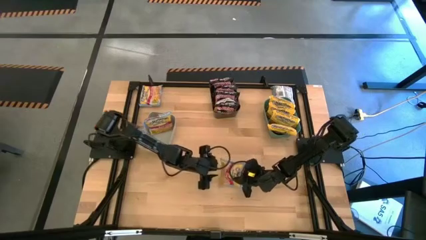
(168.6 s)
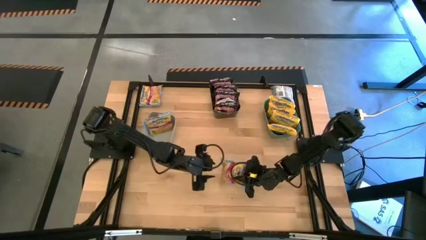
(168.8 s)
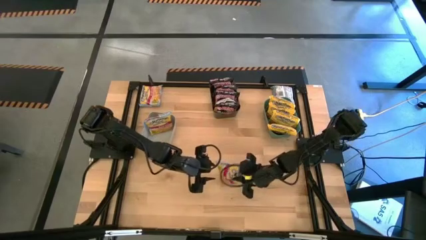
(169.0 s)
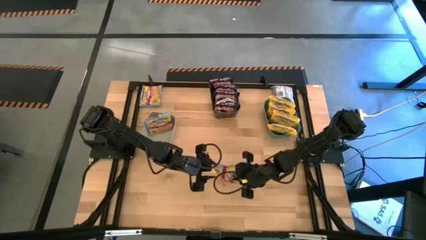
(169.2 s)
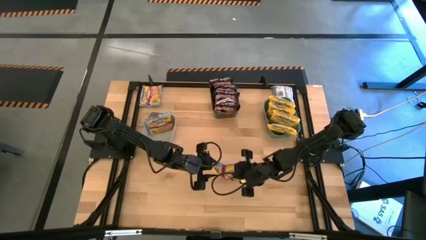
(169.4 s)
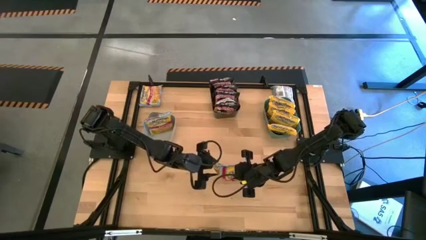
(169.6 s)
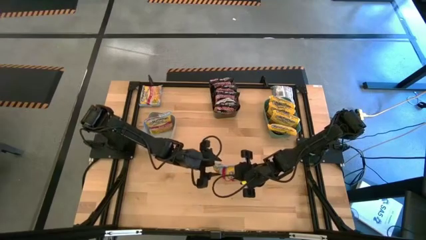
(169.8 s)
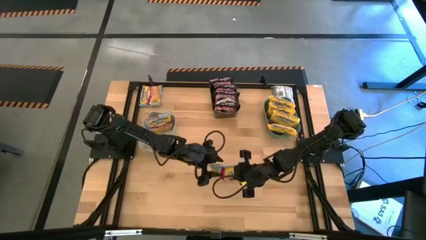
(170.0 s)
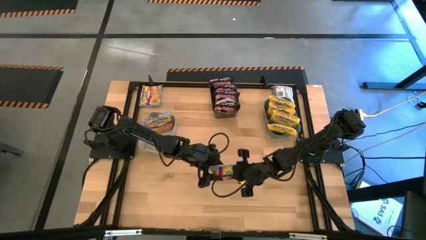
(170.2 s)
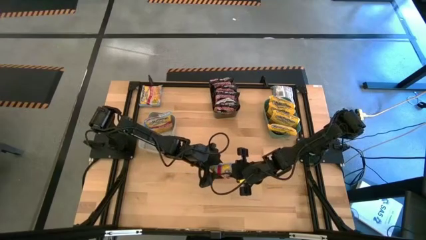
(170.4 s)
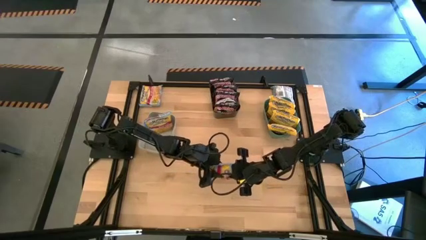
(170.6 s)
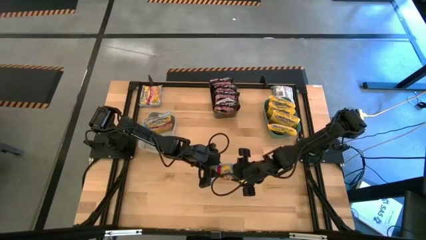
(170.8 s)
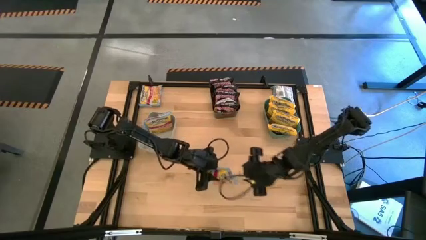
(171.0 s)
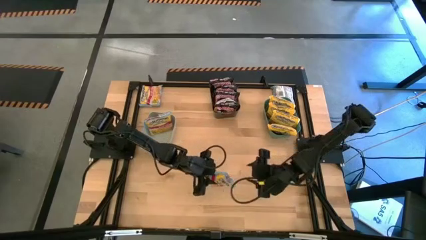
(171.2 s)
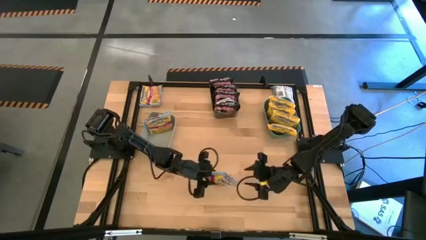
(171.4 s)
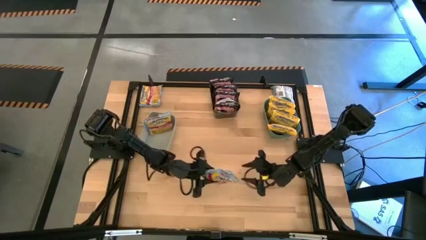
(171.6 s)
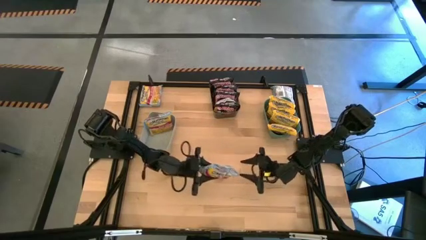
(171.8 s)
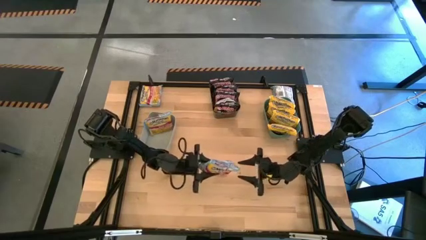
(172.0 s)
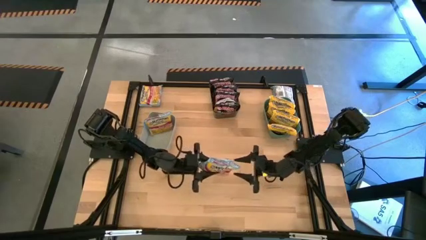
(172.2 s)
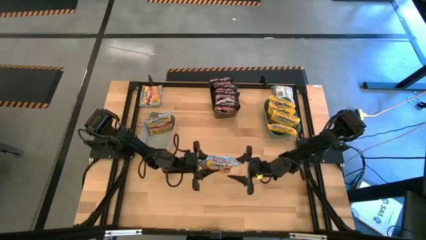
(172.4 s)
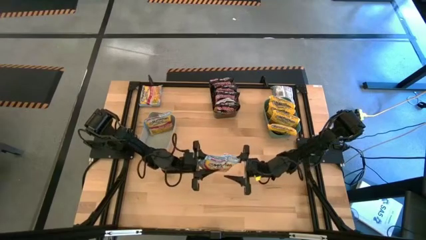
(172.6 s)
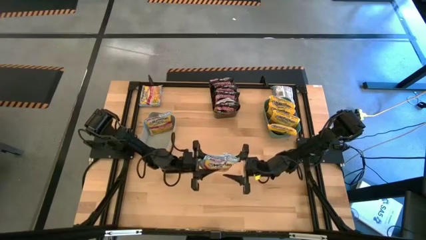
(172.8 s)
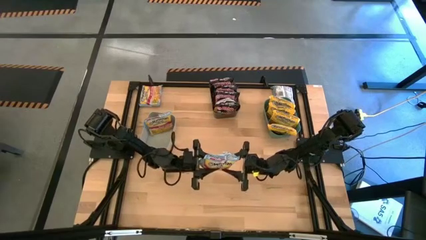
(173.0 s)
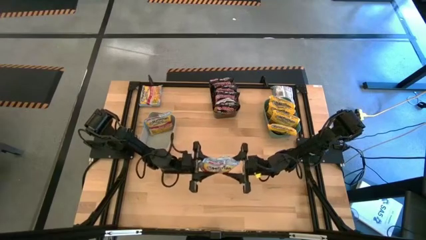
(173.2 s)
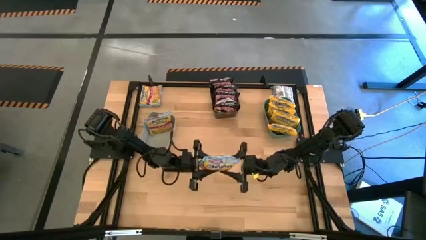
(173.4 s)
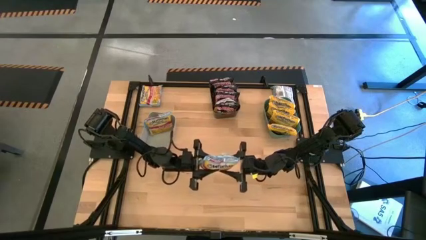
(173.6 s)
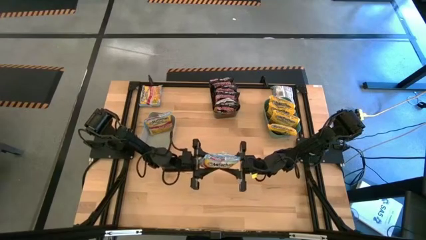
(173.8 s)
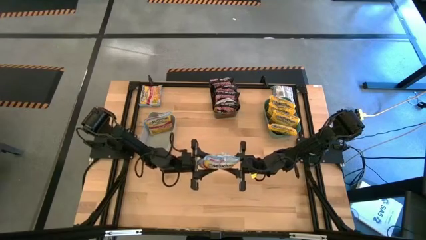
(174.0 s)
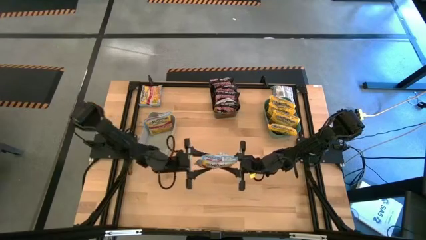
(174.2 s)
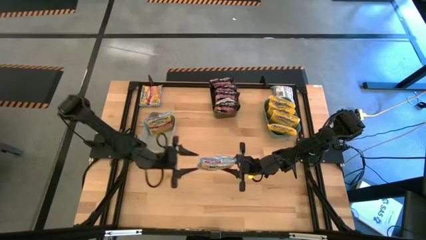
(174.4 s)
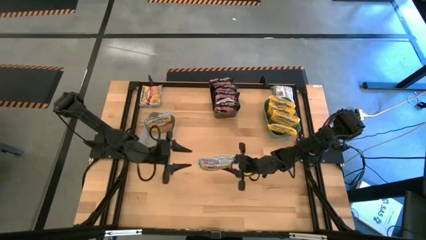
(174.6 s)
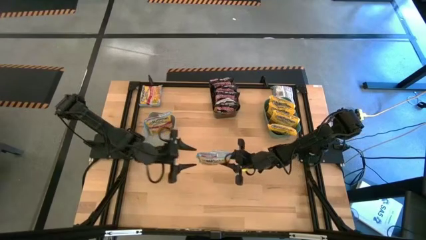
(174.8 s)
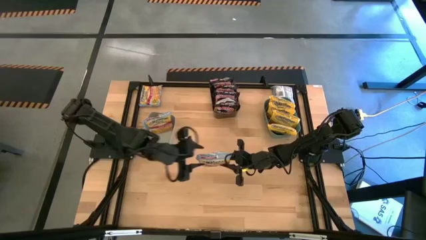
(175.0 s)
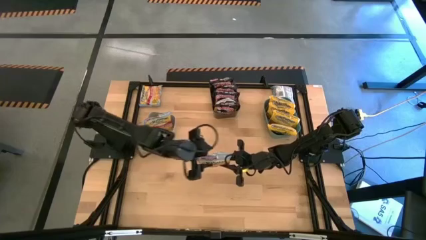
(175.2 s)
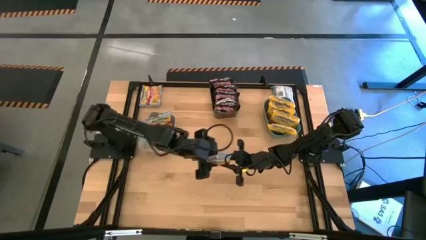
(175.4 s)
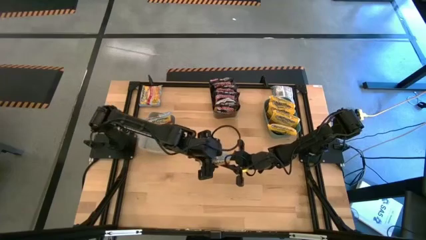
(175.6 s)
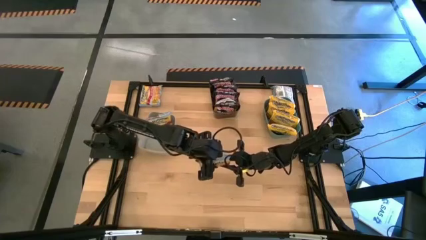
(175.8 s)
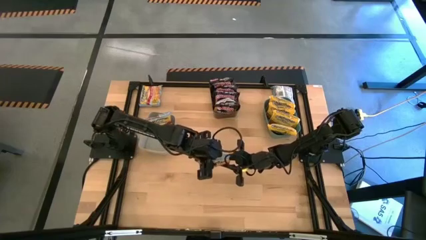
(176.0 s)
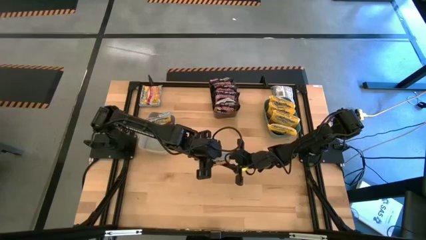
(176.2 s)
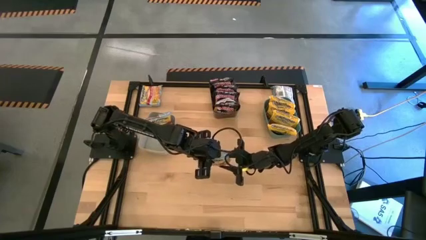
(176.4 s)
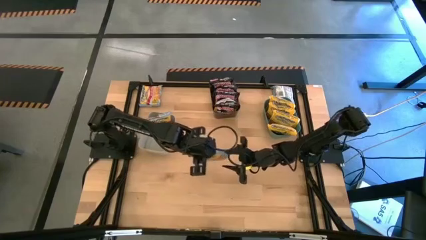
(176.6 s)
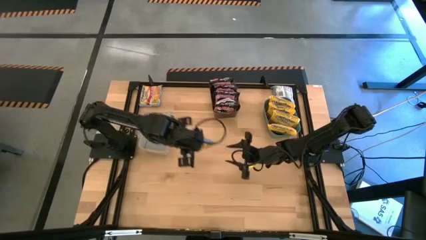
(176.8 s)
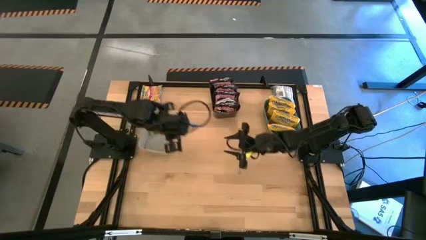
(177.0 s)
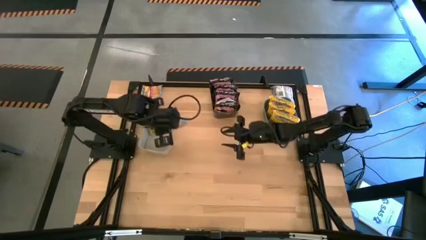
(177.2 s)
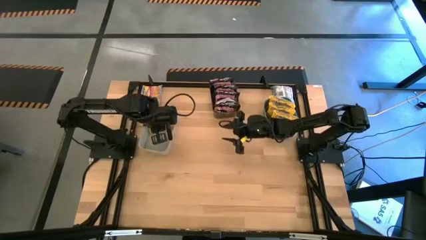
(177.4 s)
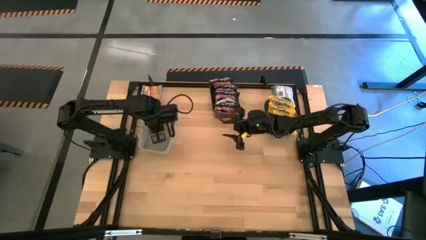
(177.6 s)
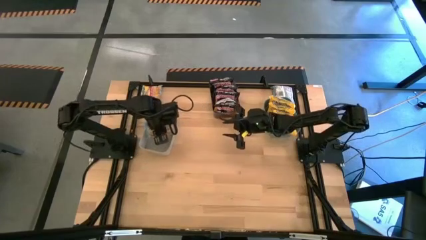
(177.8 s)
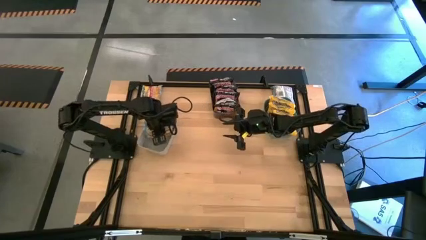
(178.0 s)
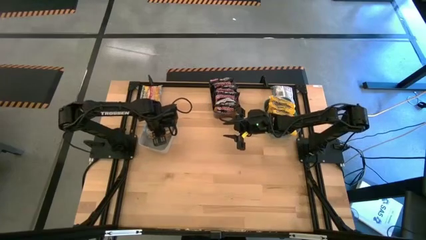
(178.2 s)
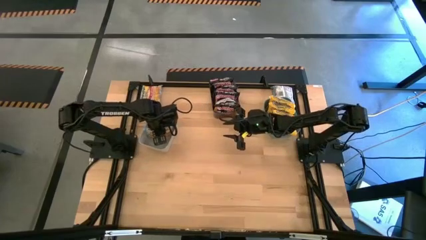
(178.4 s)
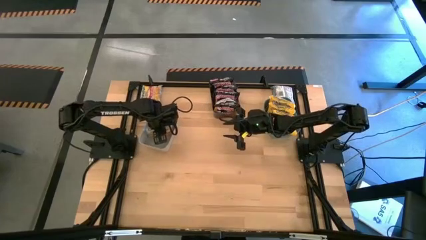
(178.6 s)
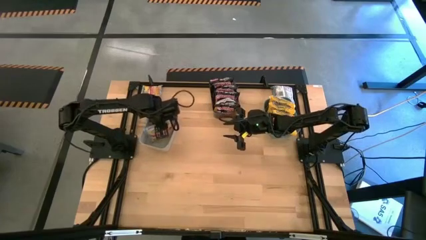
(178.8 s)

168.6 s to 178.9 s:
Task: Sort Maruchan noodles
Put the blue noodle pack into the gray bin

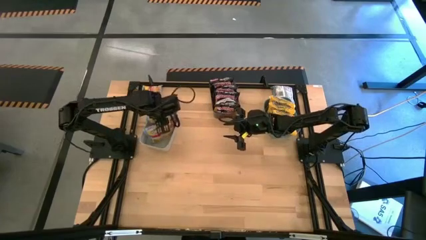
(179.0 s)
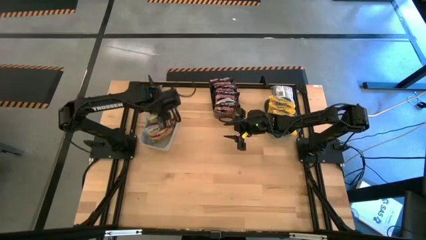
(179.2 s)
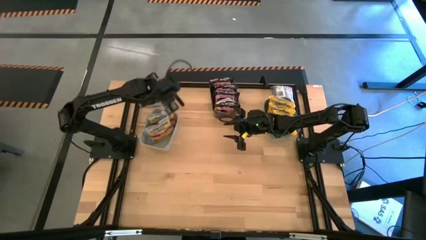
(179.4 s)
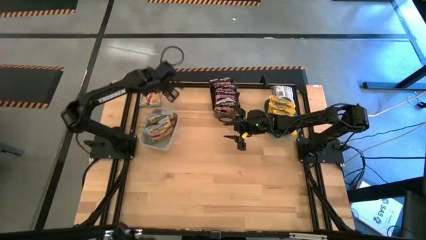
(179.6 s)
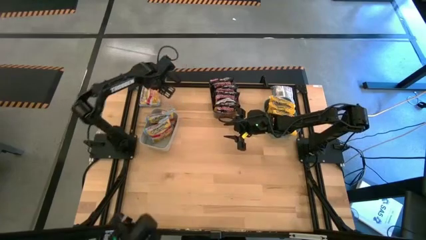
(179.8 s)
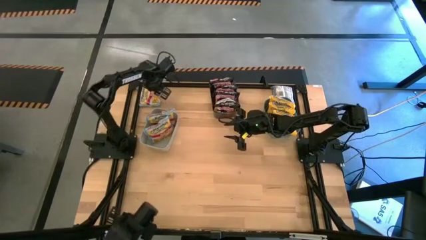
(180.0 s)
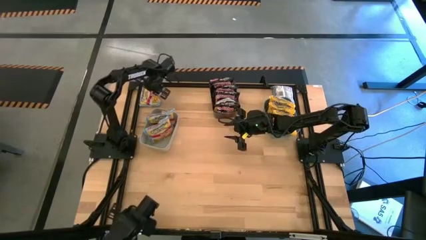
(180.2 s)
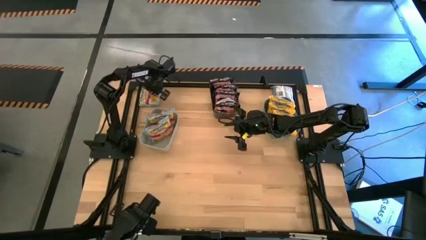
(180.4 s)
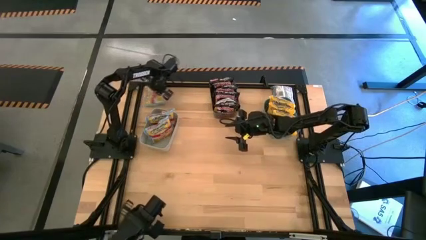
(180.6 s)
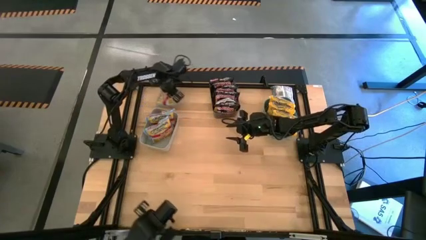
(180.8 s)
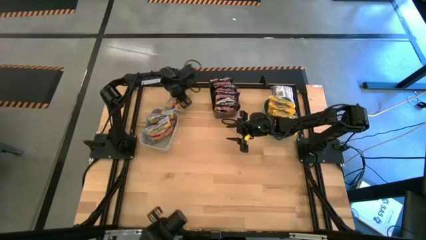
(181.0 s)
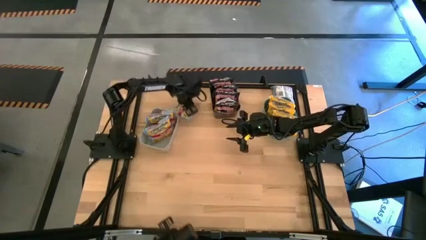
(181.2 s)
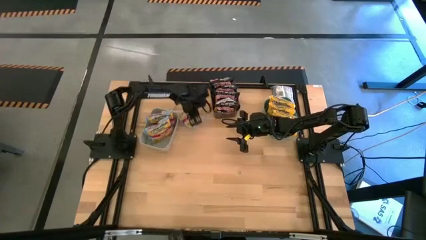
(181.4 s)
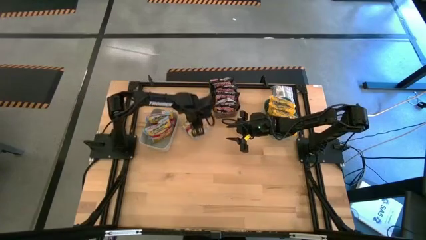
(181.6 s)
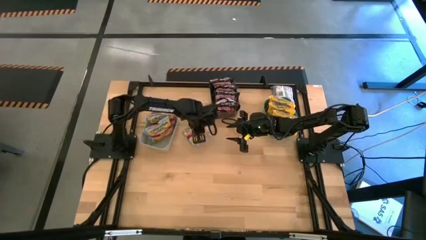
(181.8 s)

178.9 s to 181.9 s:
Move the blue noodle pack to the center of the table

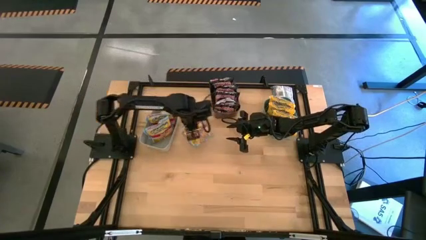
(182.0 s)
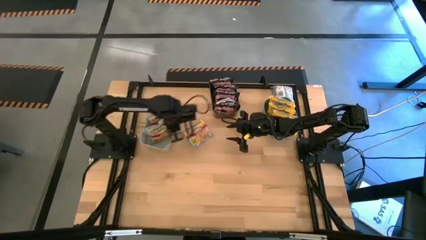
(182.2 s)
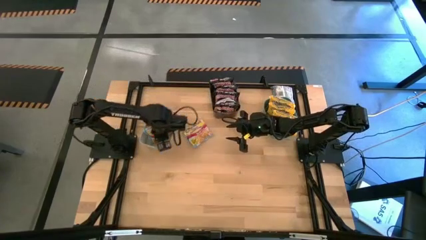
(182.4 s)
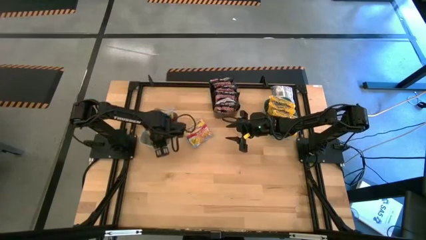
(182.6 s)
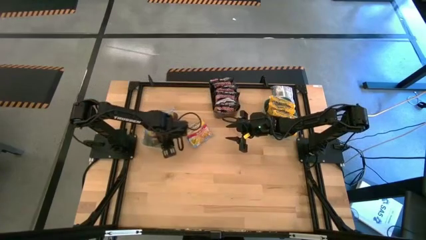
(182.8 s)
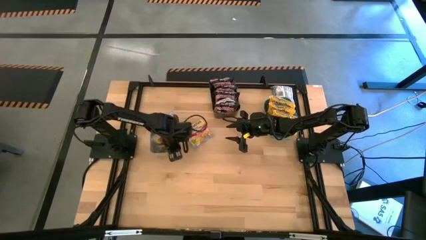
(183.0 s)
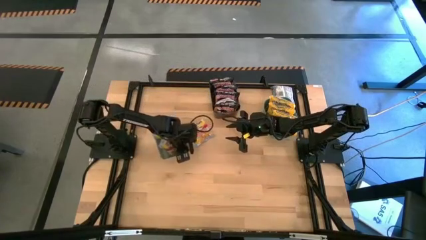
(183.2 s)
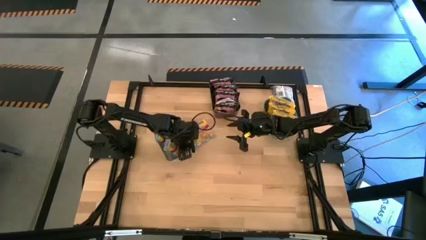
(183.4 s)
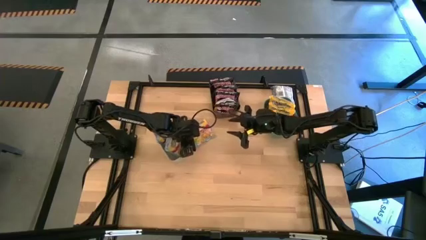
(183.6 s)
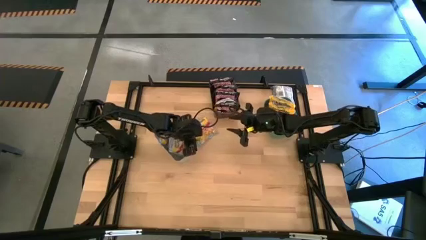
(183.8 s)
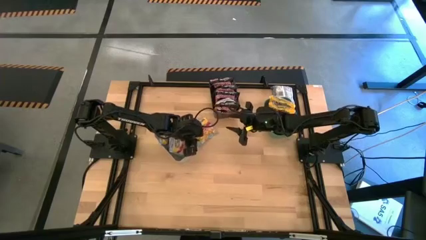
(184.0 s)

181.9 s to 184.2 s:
Adjust the gray bin

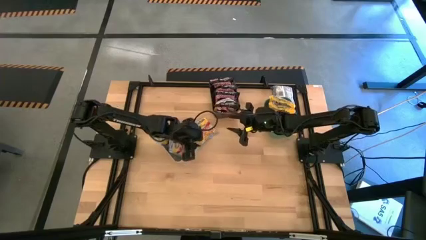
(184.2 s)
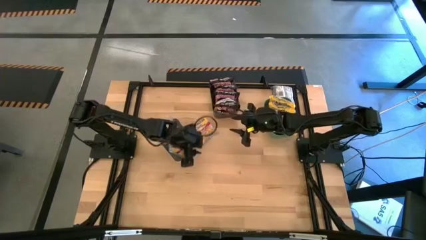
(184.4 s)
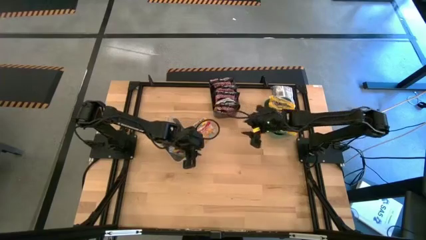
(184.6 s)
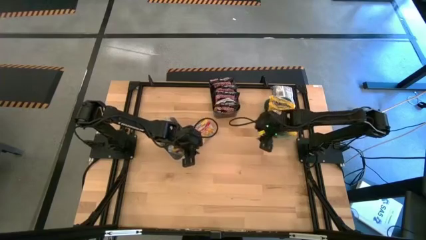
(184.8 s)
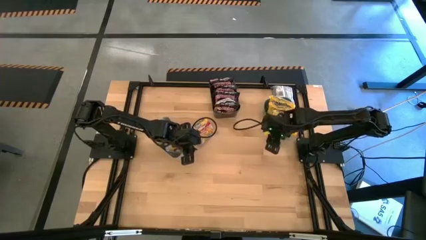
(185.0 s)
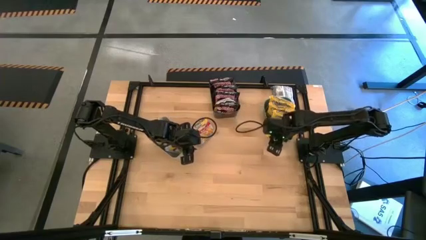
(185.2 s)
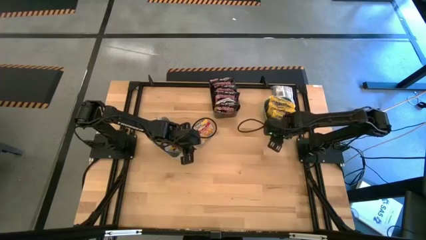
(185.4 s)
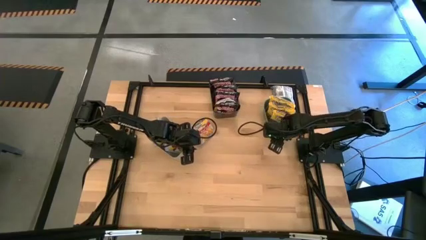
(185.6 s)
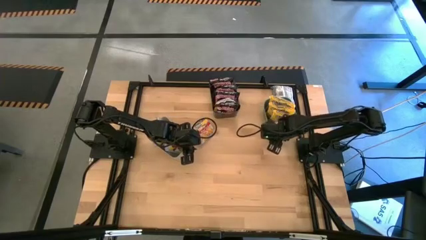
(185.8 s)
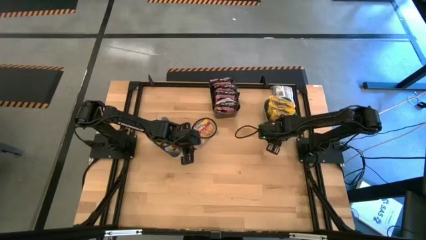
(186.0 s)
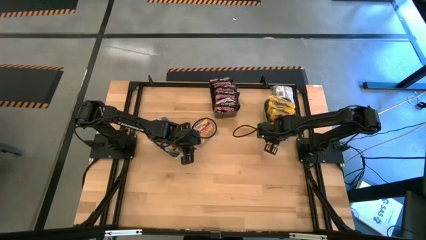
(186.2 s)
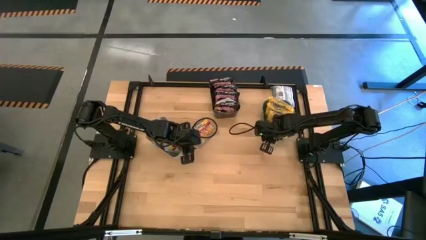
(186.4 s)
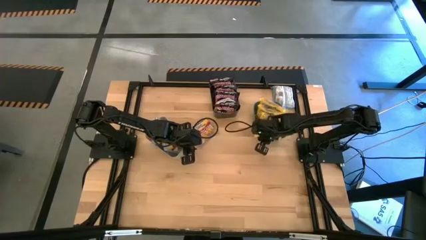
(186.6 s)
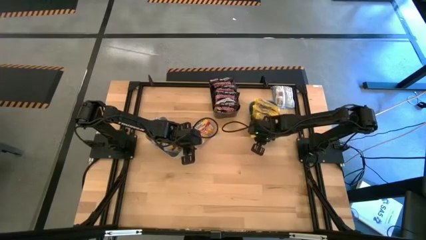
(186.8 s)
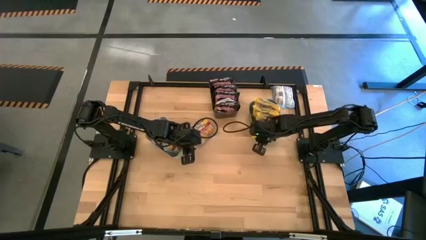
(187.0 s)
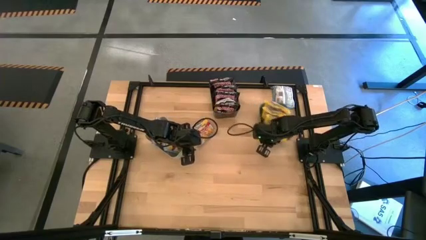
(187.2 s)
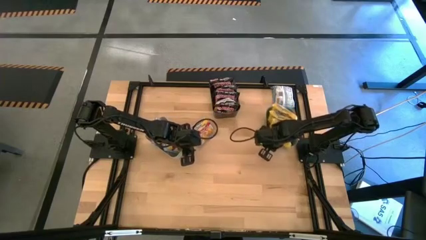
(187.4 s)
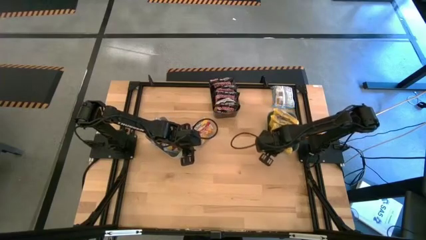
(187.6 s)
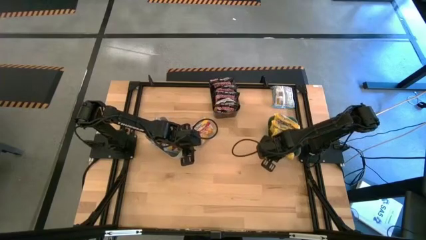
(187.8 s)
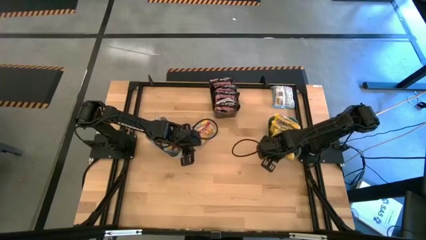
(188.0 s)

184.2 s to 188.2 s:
Adjust the blue bin
